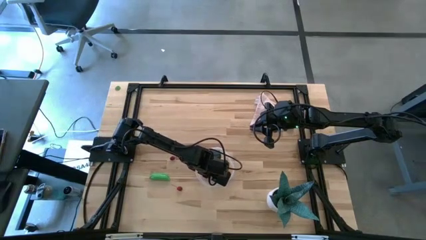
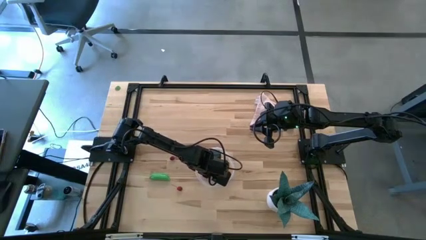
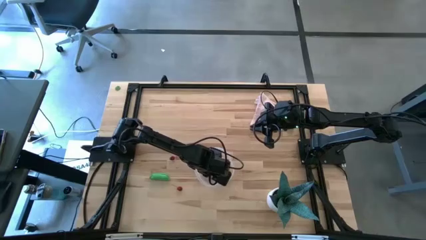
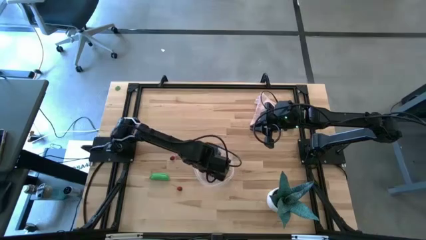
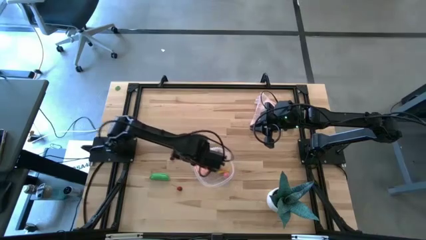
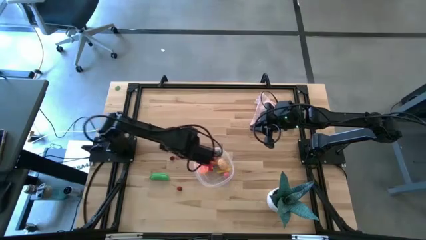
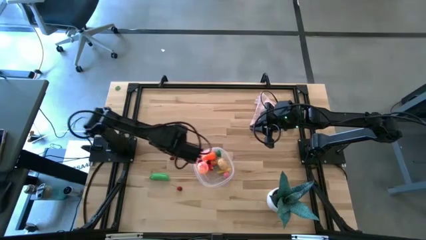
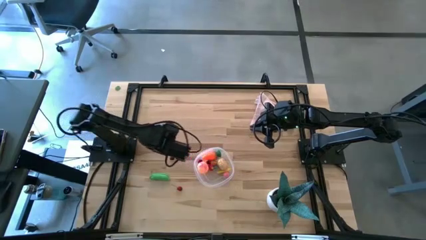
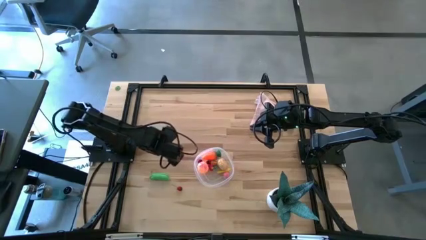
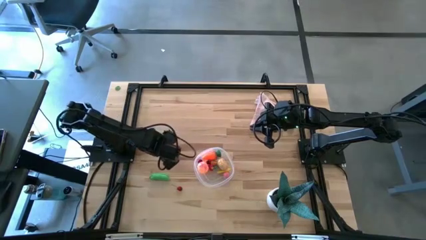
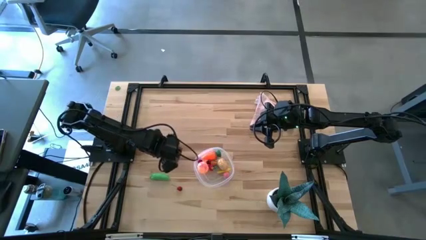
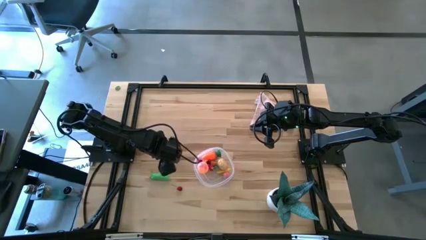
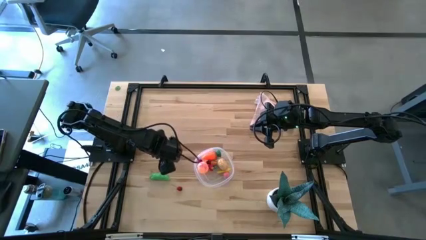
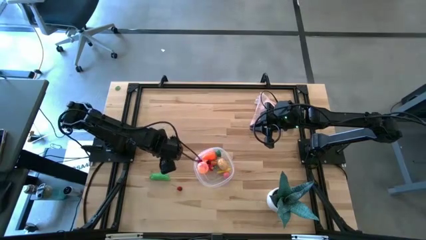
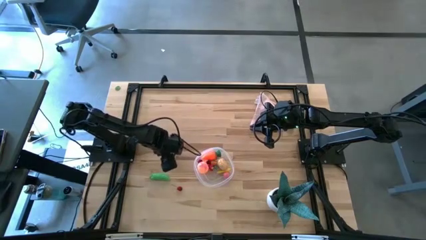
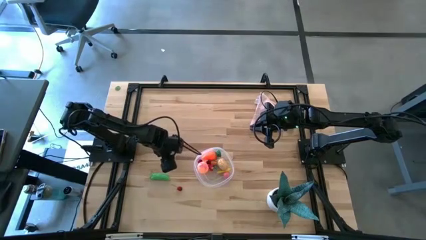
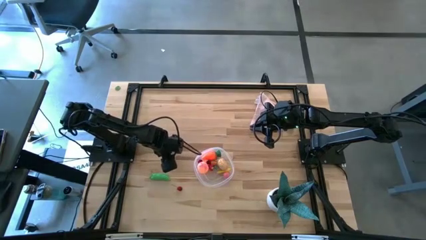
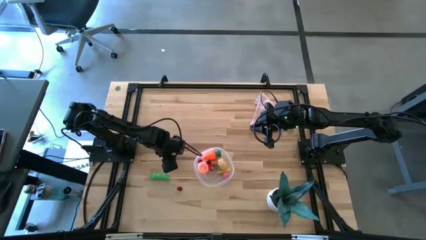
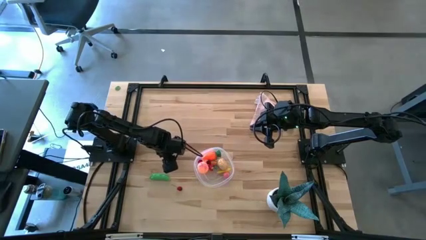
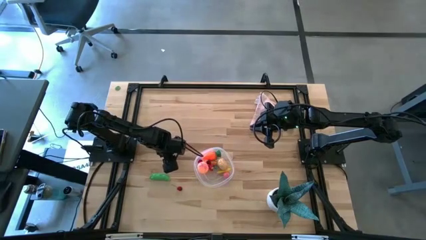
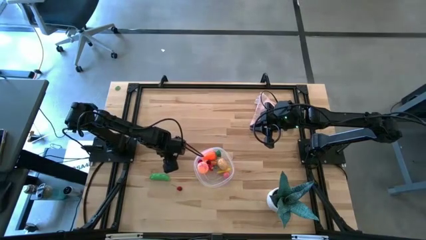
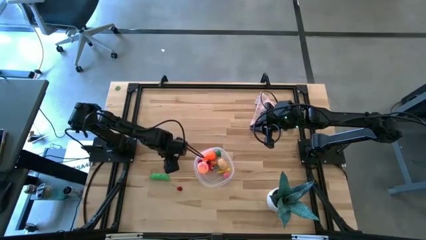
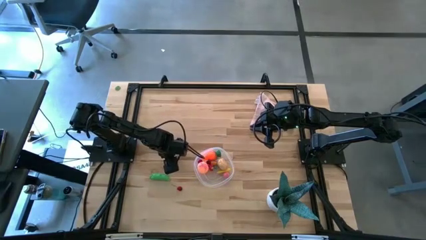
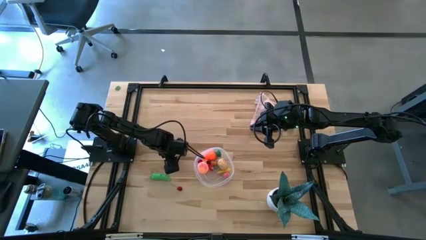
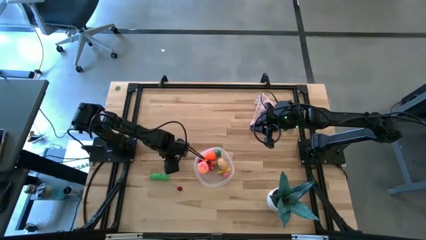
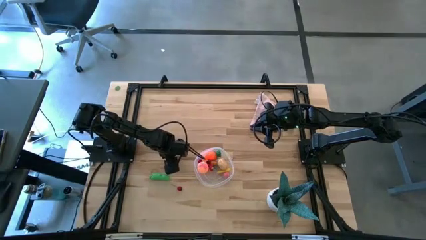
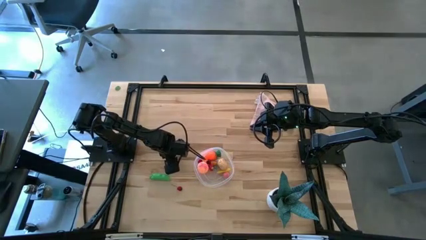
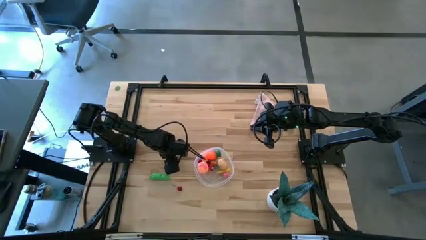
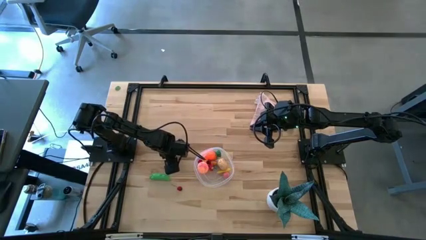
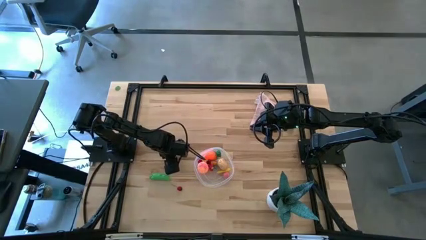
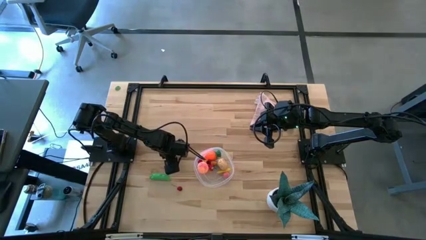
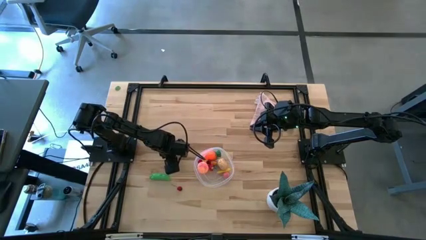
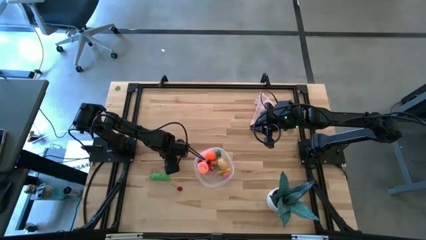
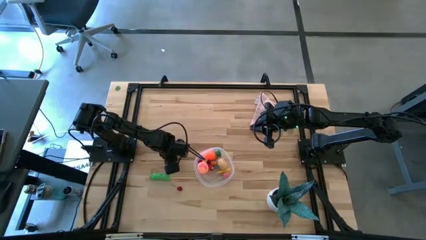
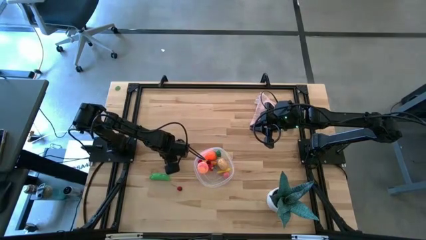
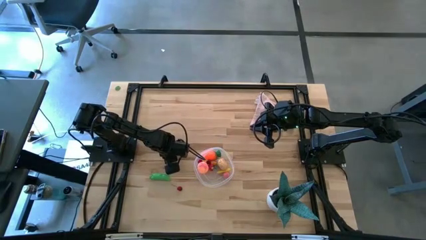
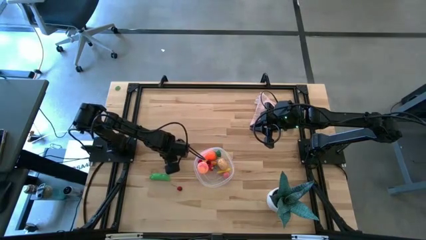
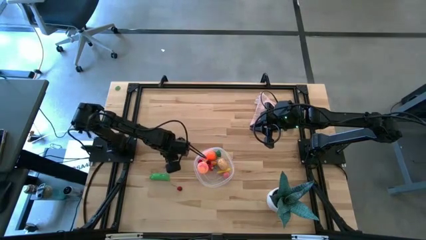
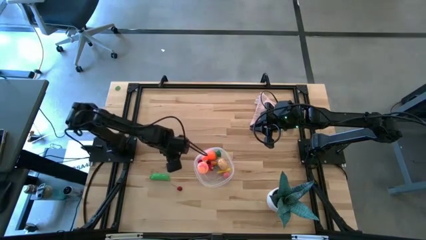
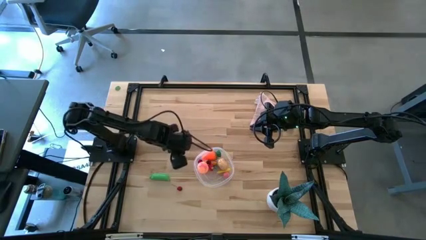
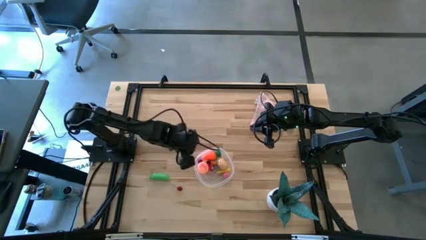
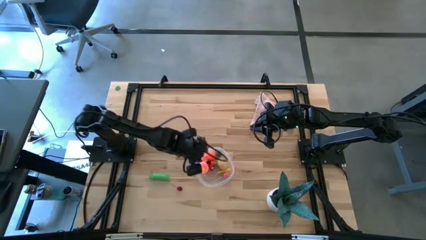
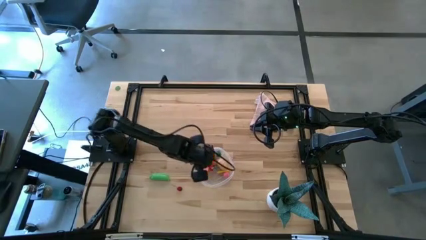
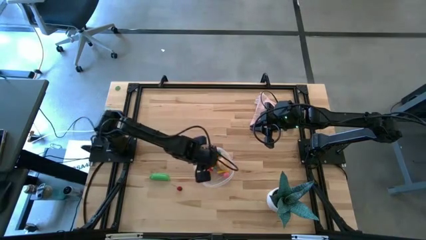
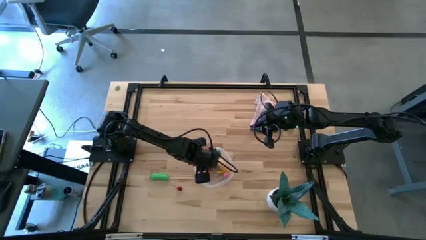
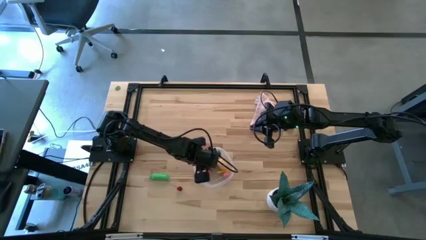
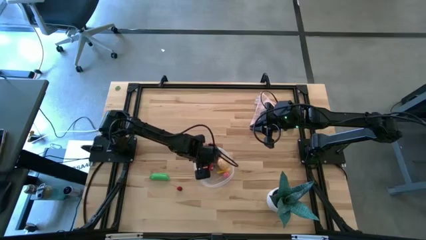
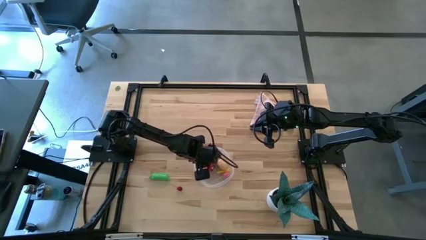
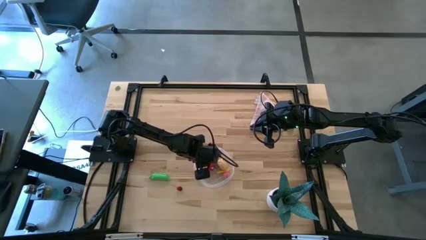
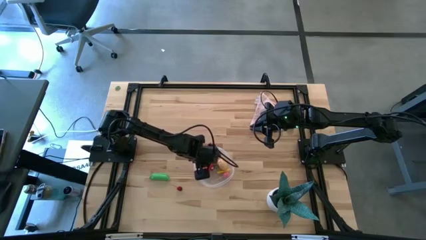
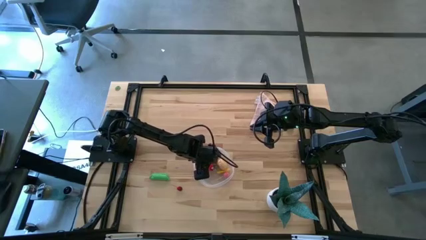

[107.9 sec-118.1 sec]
Task: Pick and placing Produce into tupperware
Put the cherry into the transparent bin
